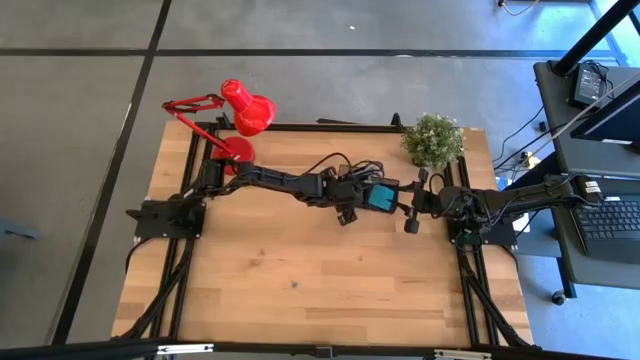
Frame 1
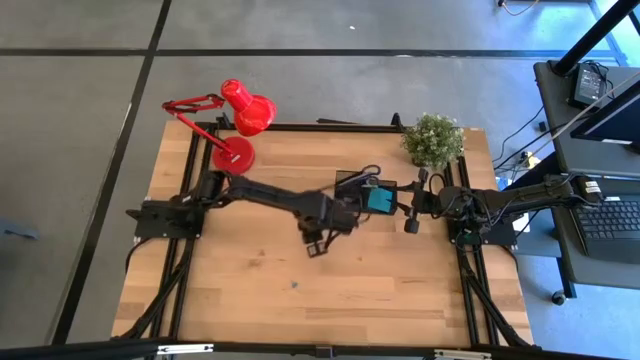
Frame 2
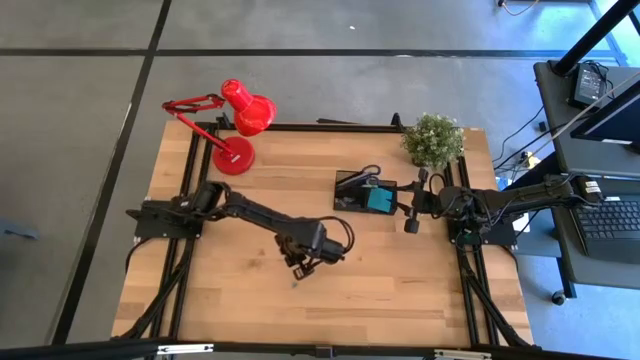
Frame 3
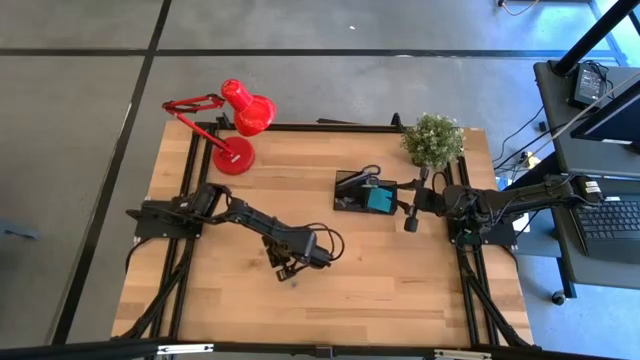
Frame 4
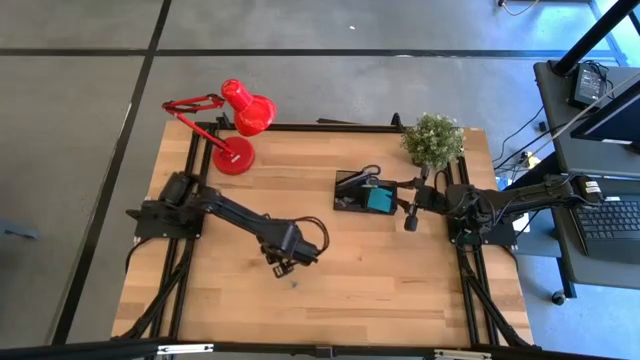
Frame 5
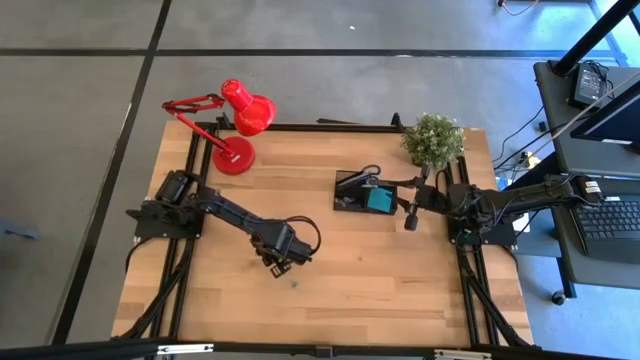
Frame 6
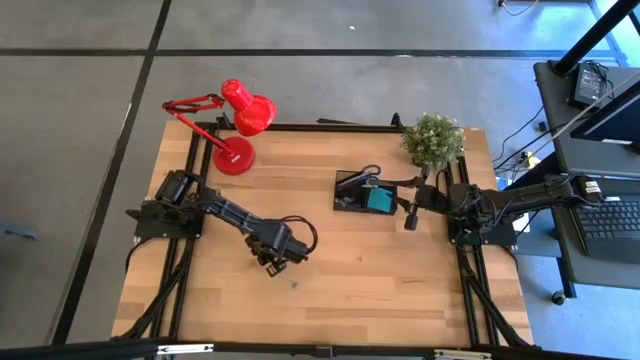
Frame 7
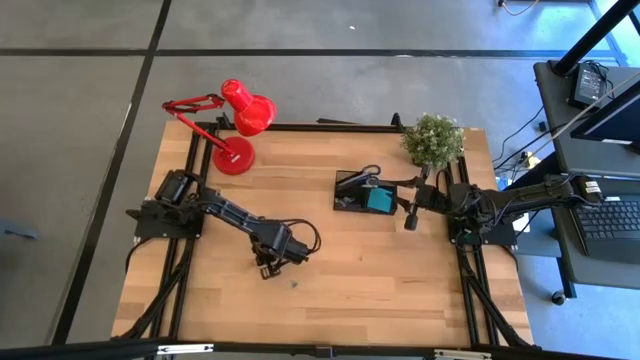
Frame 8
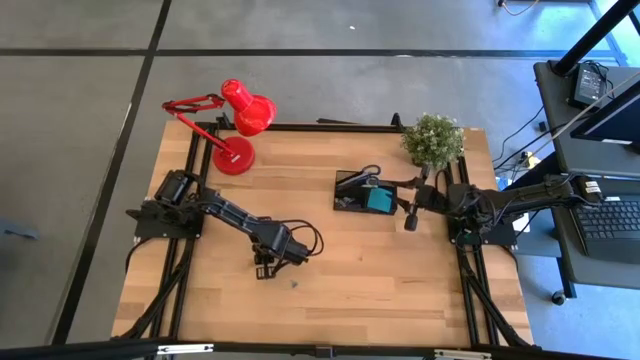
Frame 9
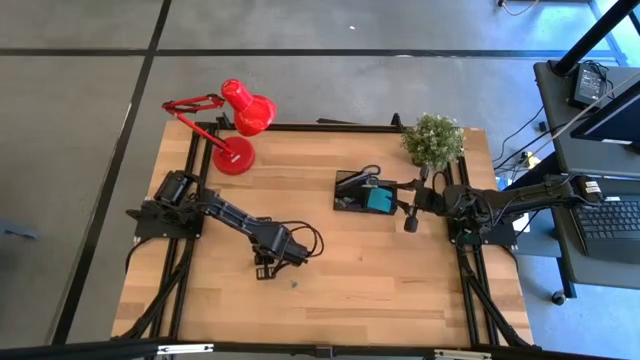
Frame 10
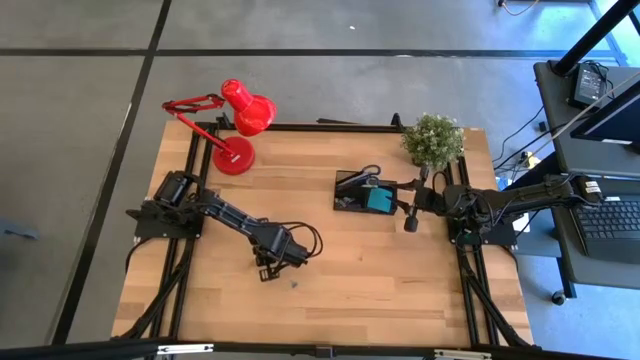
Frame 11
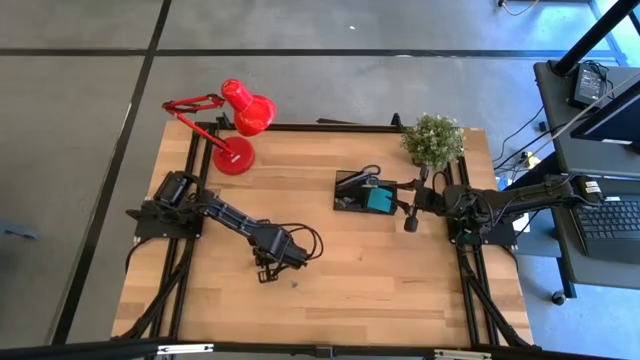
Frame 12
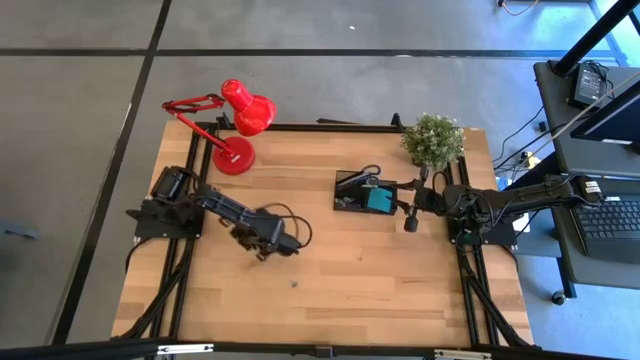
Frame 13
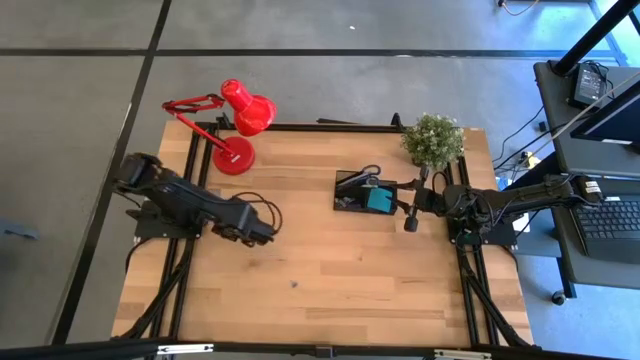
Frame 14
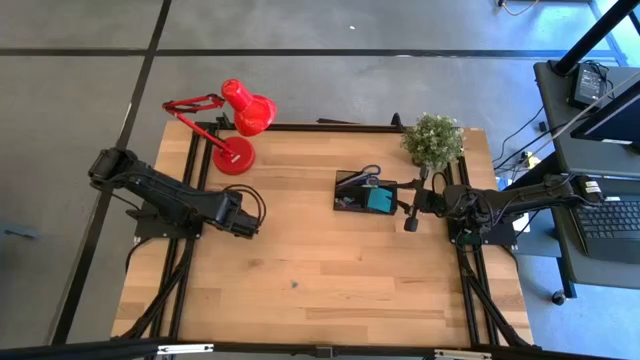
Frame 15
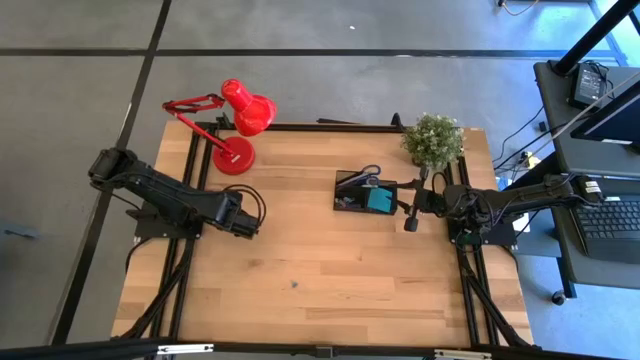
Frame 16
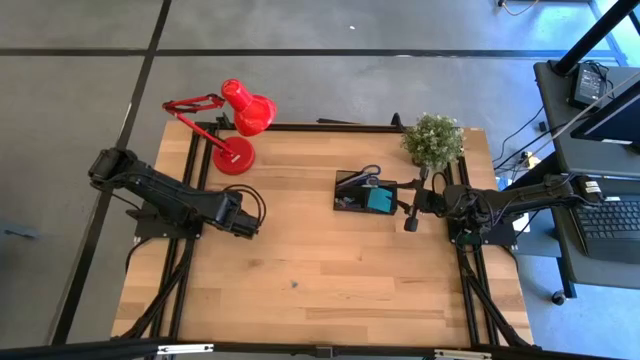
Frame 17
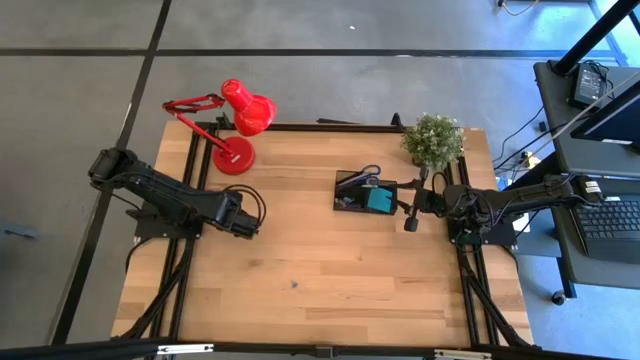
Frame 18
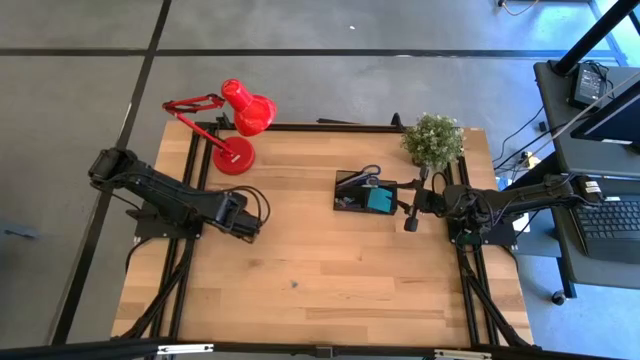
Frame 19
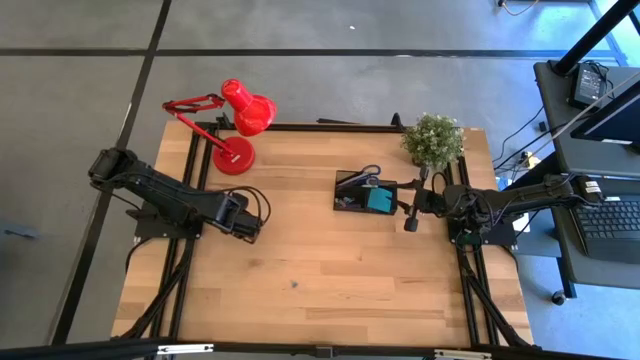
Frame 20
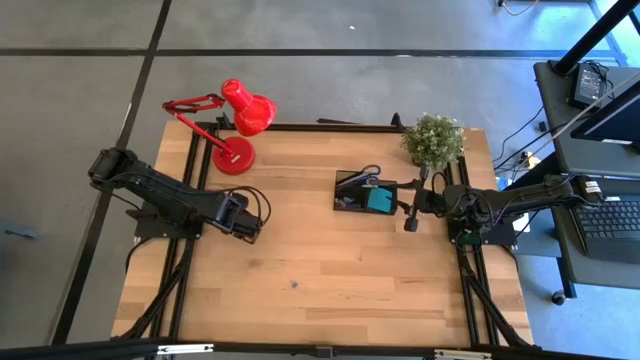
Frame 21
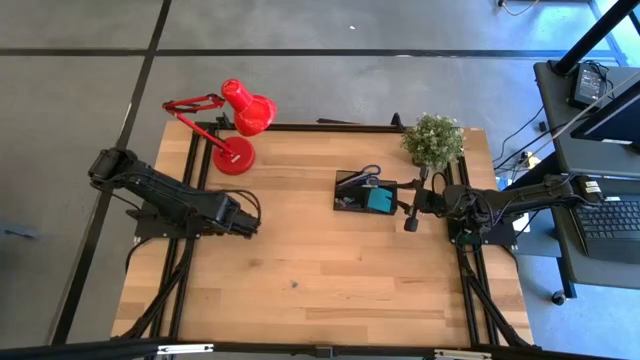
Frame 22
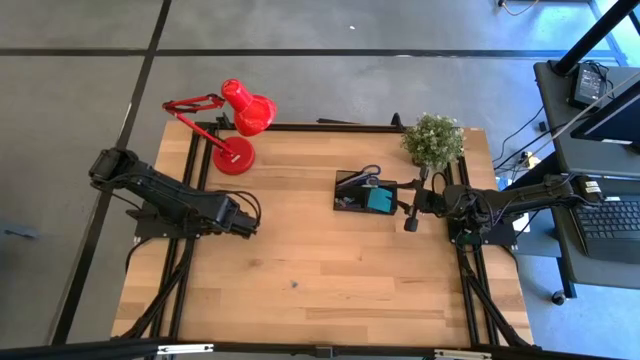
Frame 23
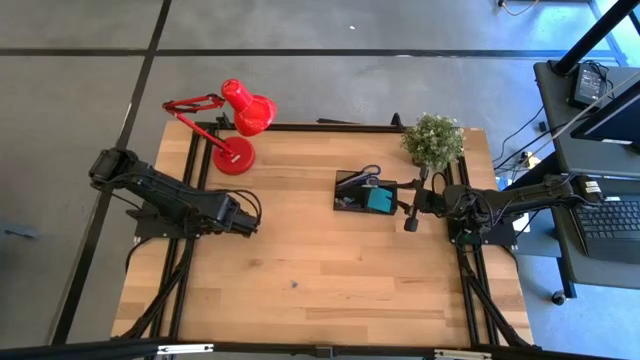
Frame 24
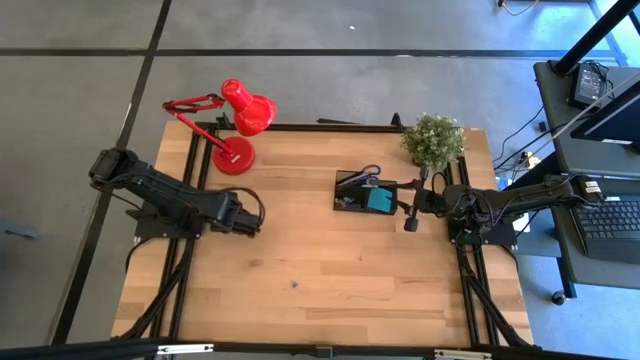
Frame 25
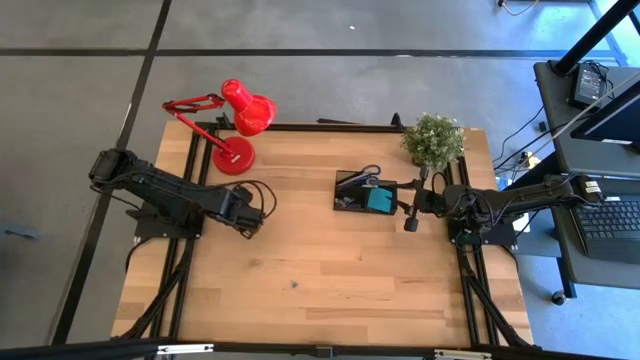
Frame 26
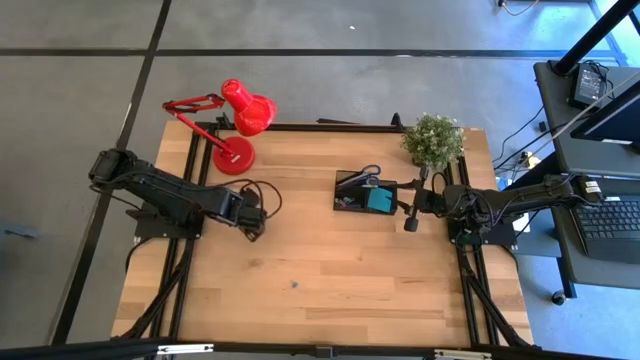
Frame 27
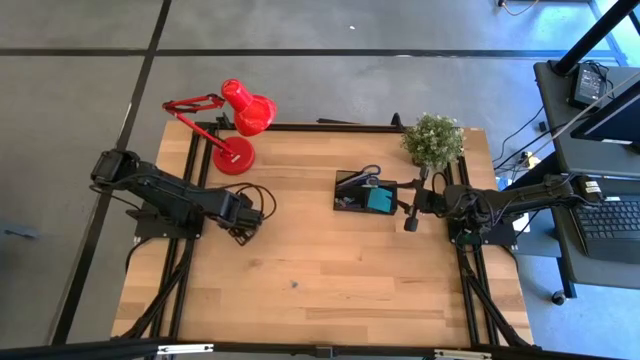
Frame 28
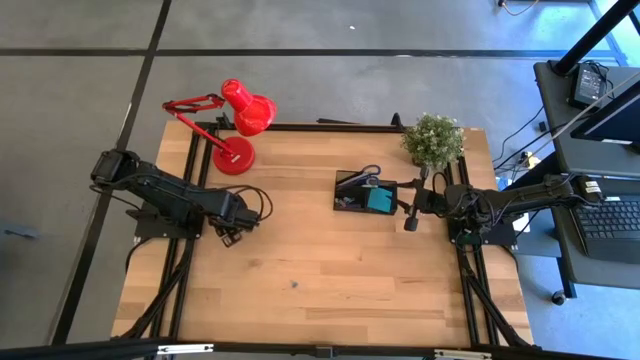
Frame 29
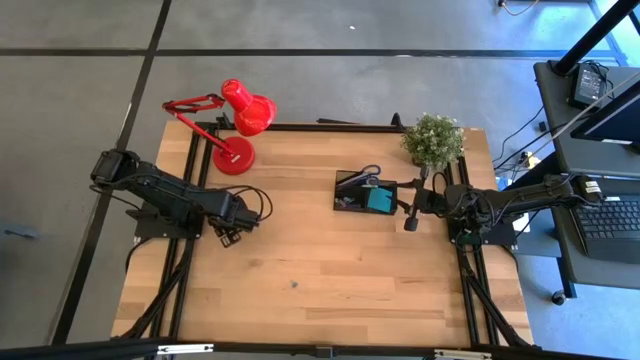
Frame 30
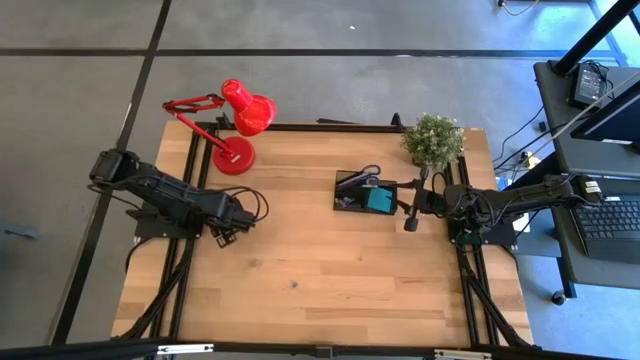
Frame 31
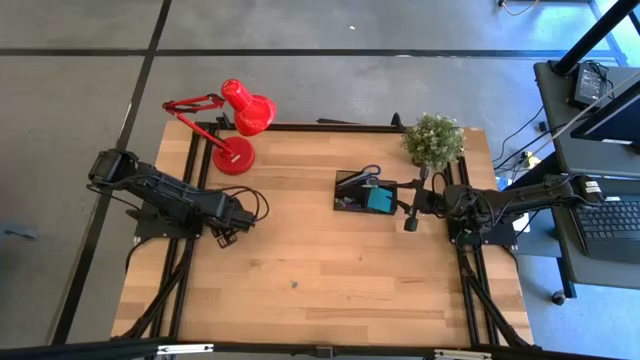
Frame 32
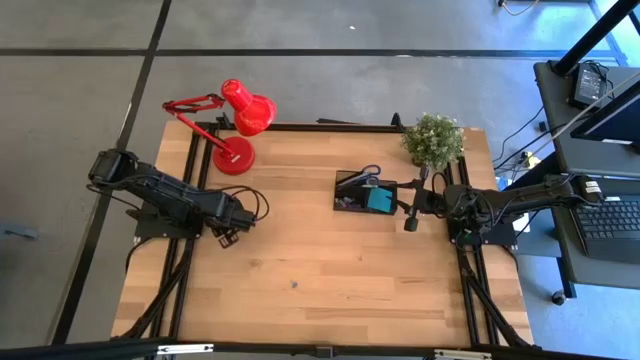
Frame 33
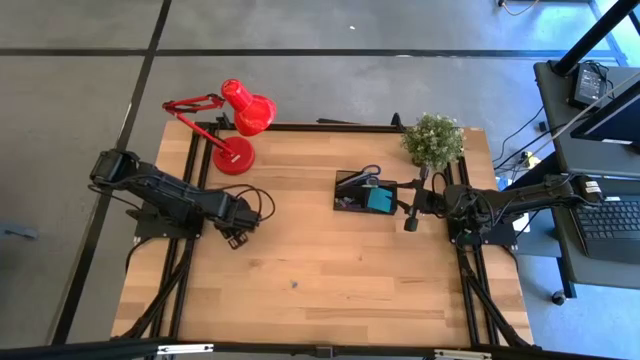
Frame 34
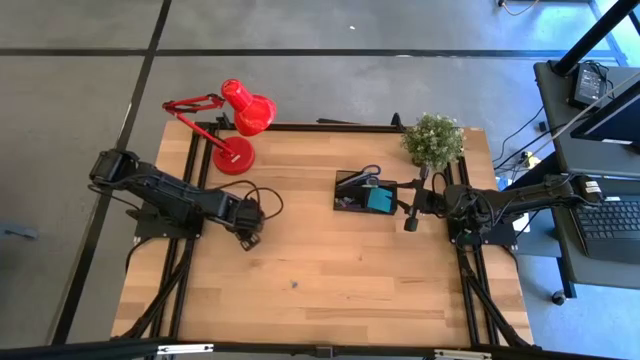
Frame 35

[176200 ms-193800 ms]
Task: Pick and place office supplies into organizer
Put the pink binder clip into the black desk organizer

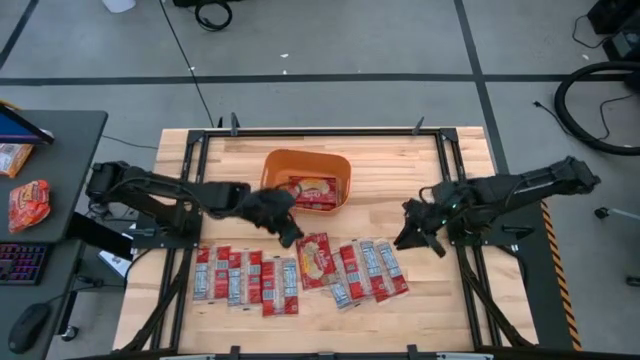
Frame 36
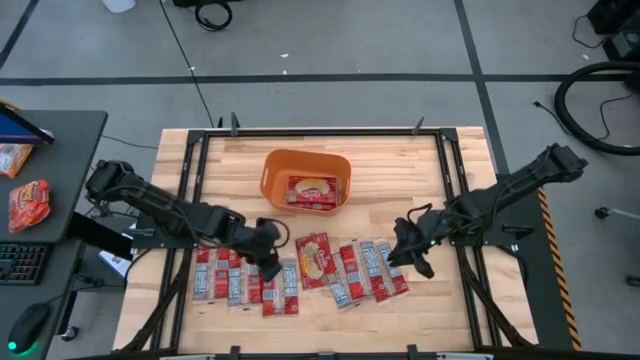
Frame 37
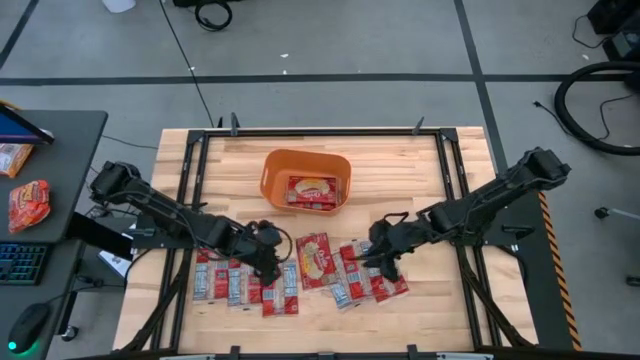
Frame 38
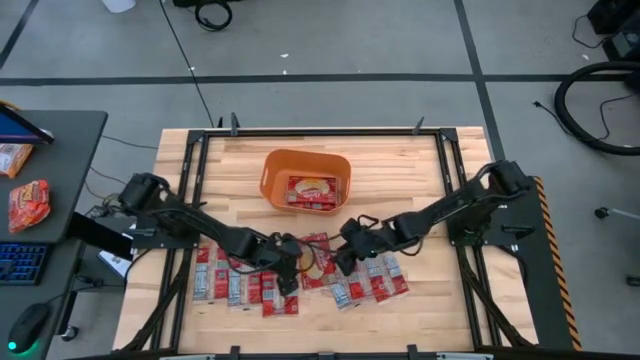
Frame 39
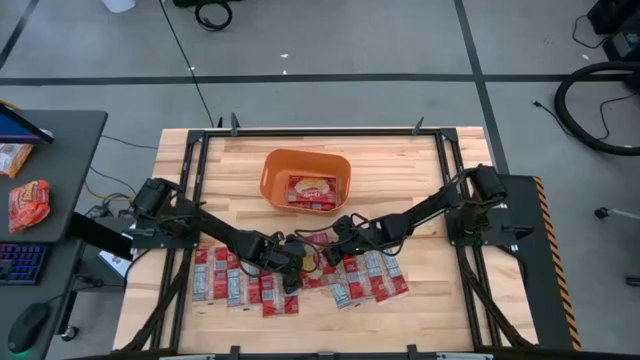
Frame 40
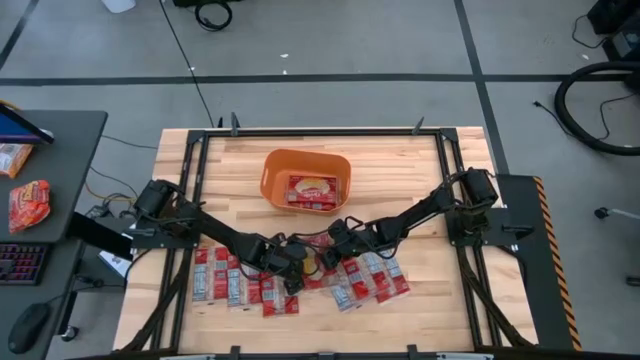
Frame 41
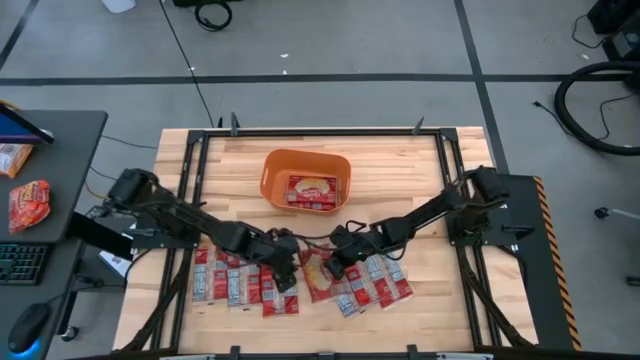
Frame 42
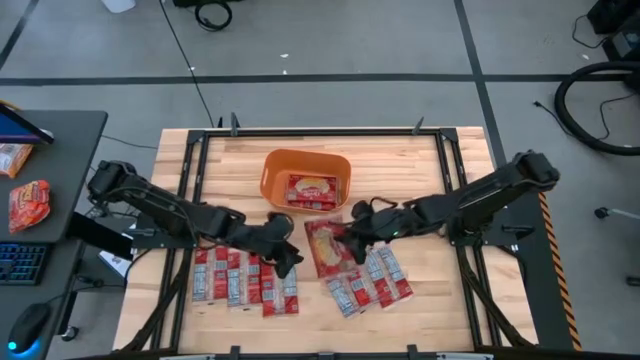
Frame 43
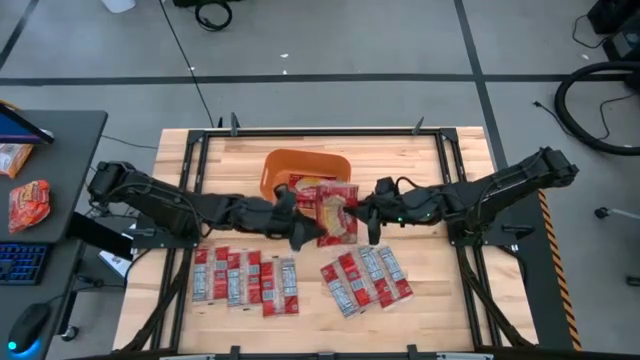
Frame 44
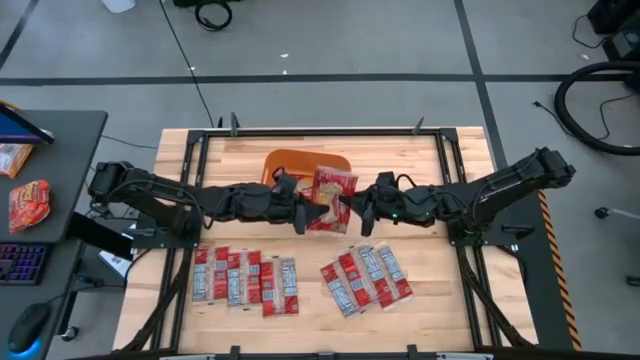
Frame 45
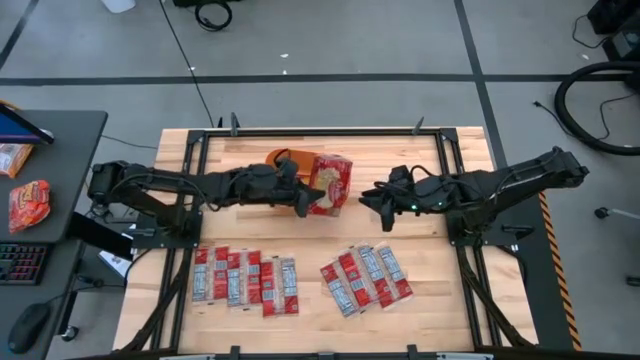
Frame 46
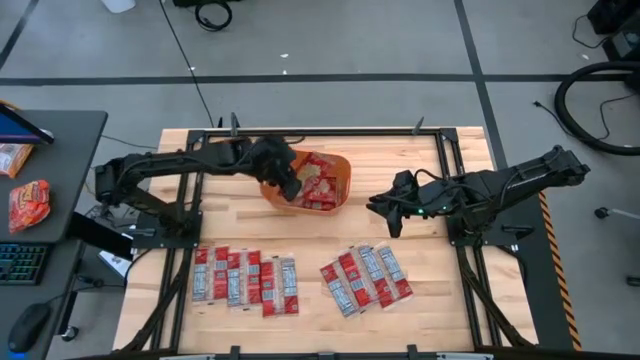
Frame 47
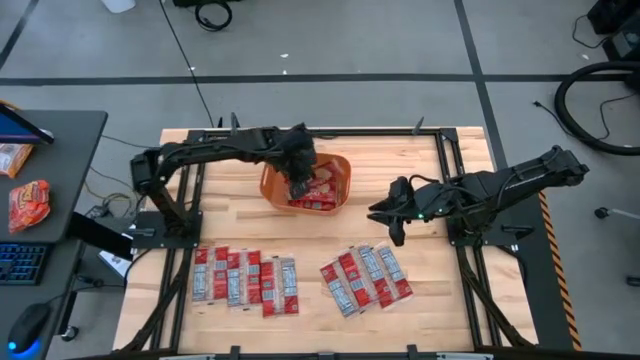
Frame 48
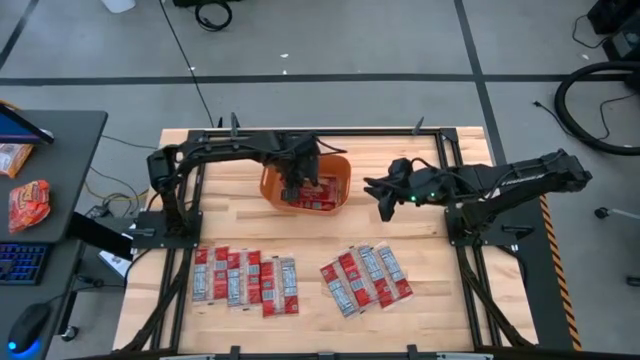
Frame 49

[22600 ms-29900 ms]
Task: Sort popcorn bags into baskets
Put the red popcorn bag into the orange bin
